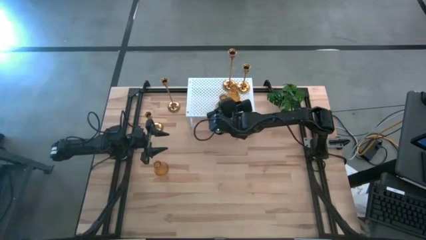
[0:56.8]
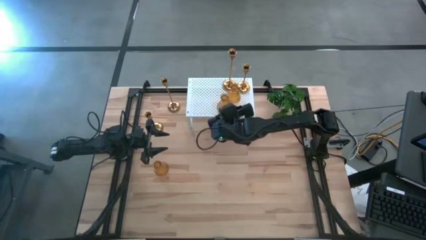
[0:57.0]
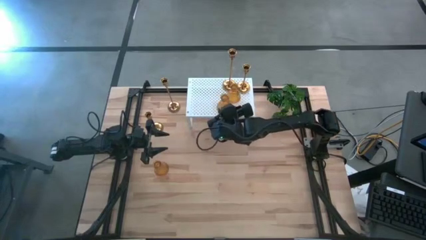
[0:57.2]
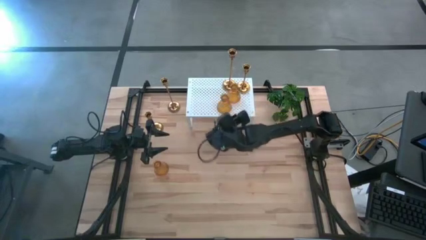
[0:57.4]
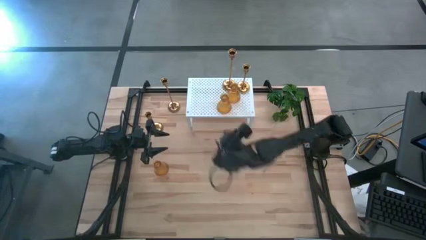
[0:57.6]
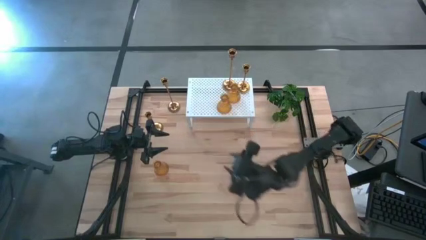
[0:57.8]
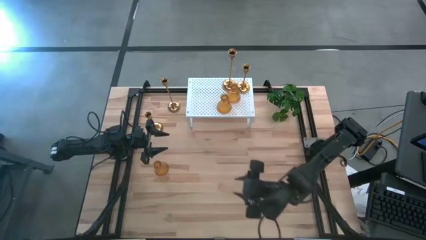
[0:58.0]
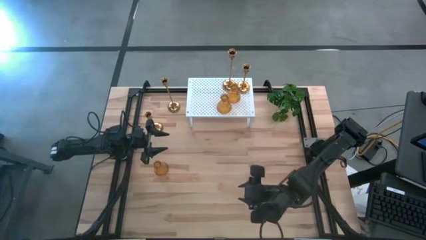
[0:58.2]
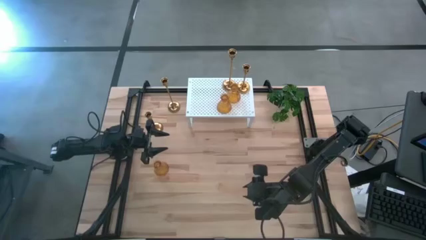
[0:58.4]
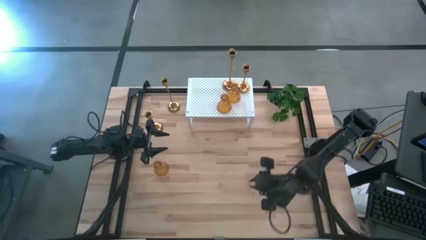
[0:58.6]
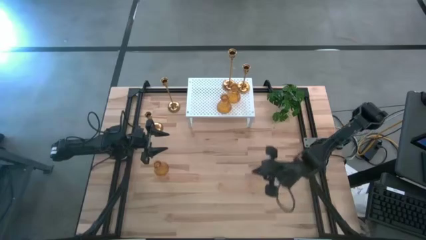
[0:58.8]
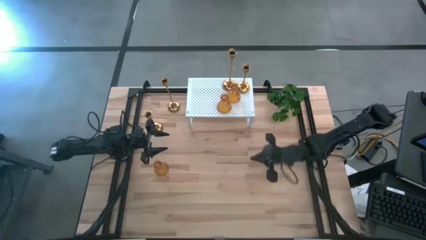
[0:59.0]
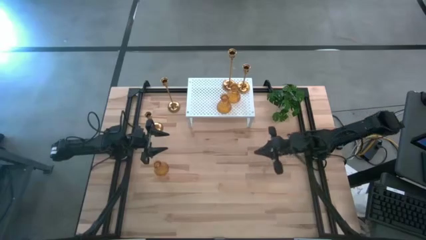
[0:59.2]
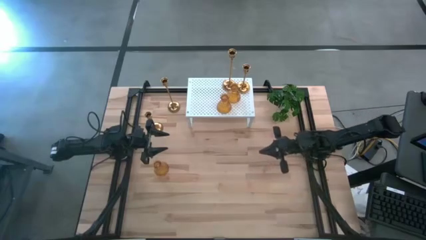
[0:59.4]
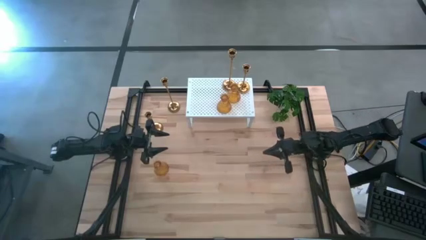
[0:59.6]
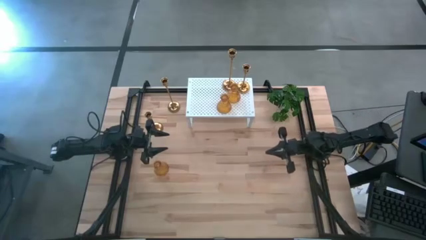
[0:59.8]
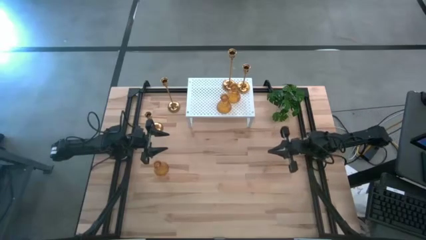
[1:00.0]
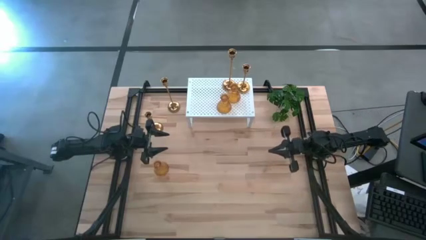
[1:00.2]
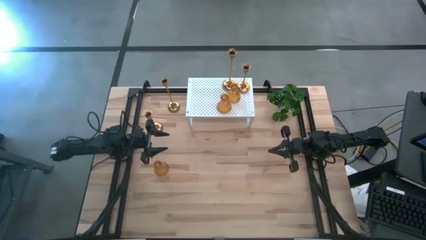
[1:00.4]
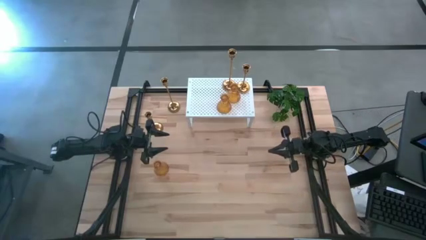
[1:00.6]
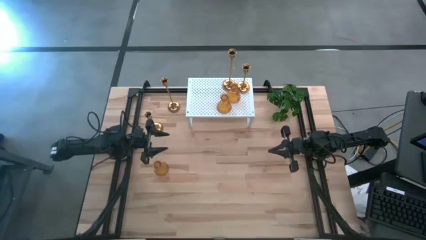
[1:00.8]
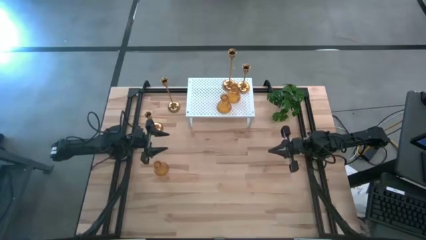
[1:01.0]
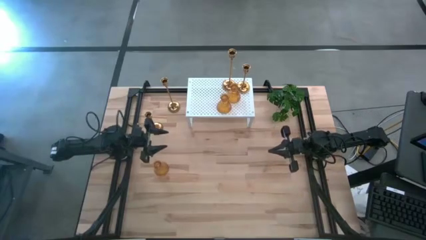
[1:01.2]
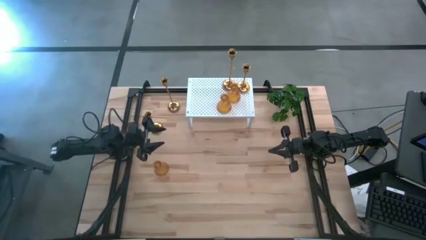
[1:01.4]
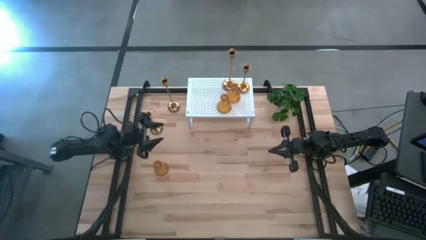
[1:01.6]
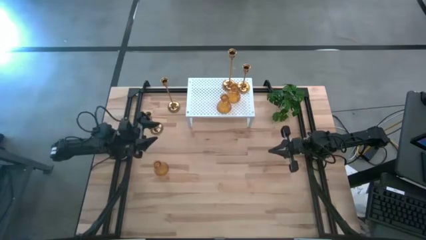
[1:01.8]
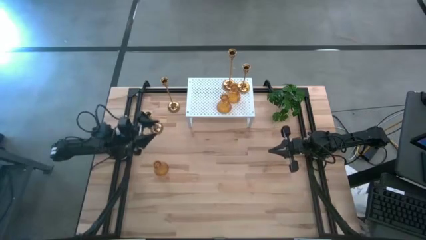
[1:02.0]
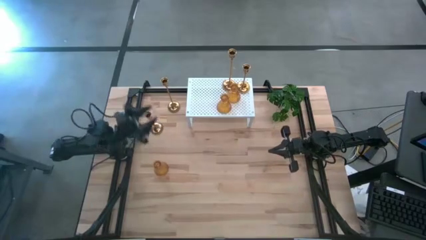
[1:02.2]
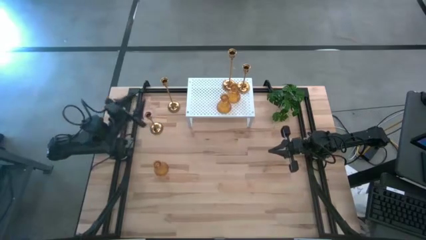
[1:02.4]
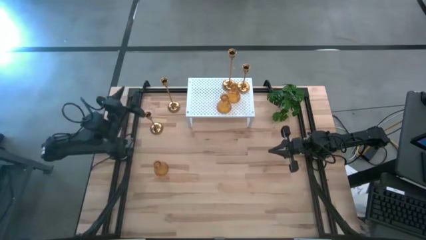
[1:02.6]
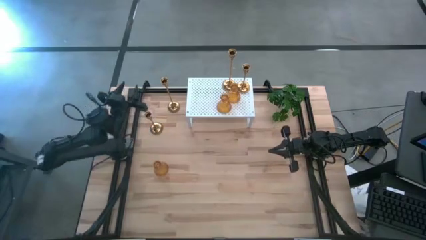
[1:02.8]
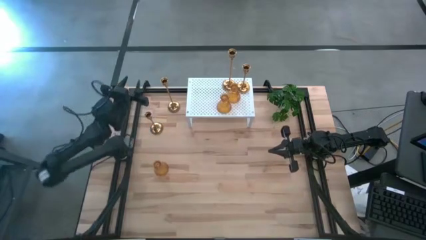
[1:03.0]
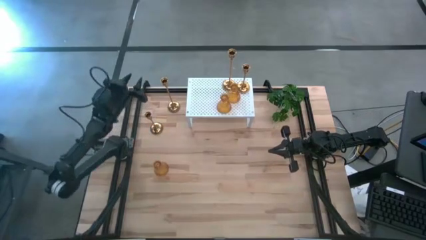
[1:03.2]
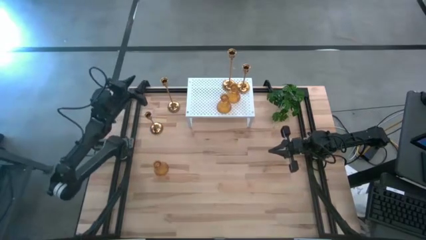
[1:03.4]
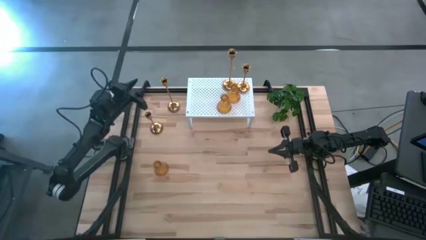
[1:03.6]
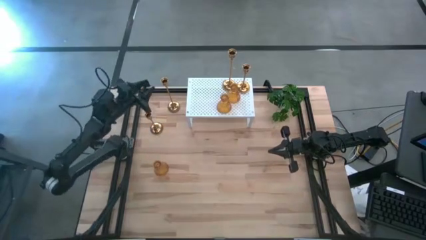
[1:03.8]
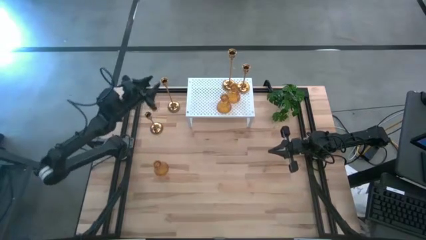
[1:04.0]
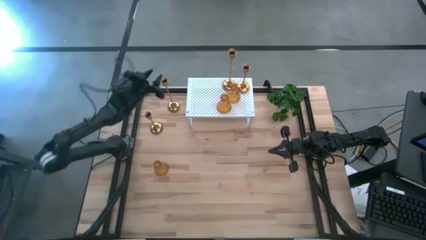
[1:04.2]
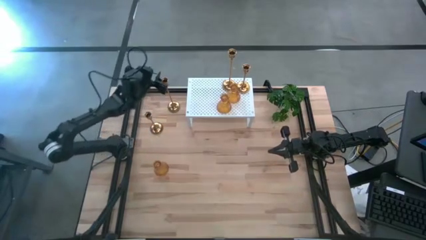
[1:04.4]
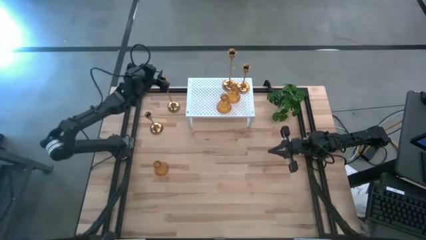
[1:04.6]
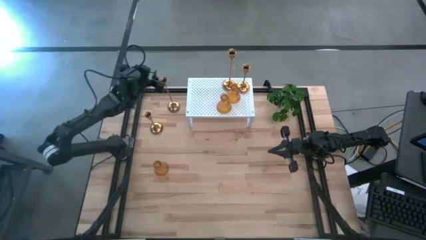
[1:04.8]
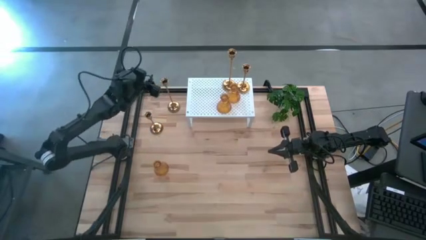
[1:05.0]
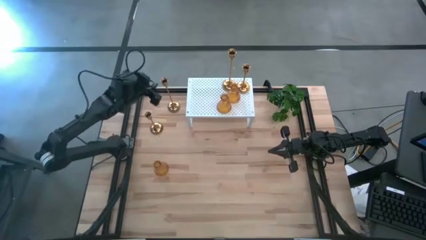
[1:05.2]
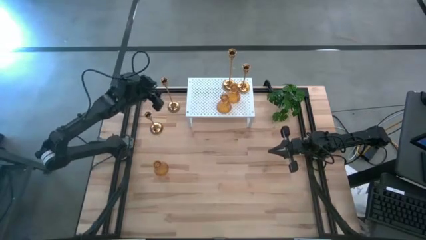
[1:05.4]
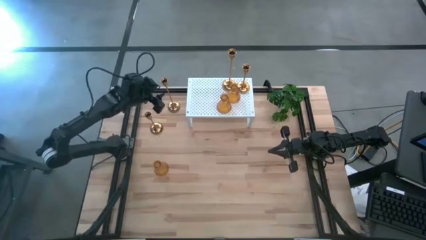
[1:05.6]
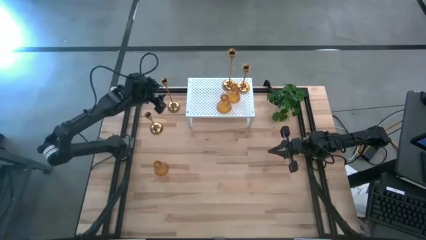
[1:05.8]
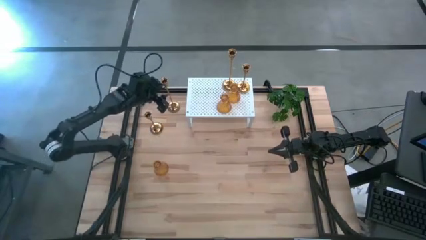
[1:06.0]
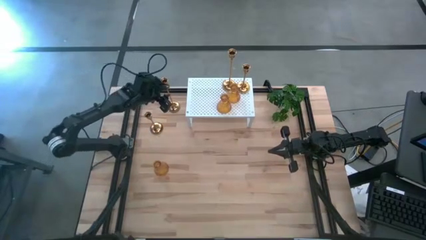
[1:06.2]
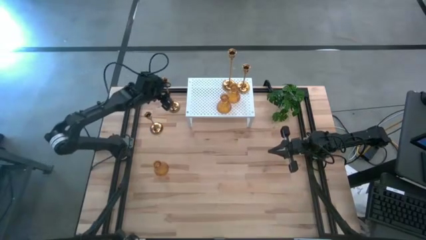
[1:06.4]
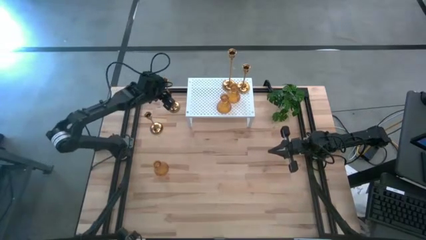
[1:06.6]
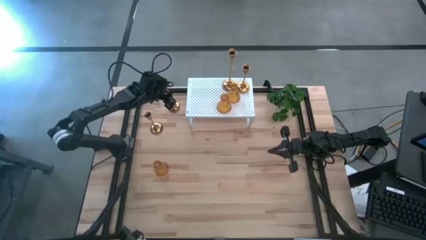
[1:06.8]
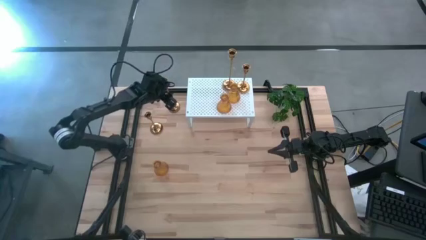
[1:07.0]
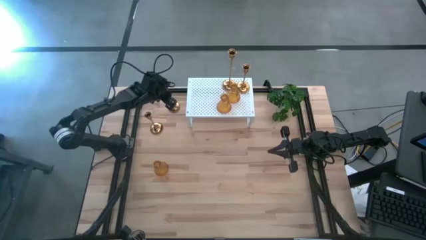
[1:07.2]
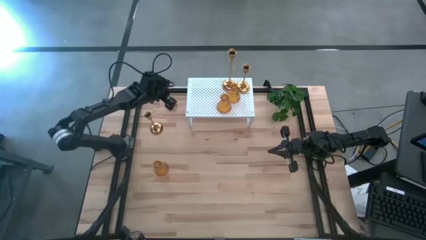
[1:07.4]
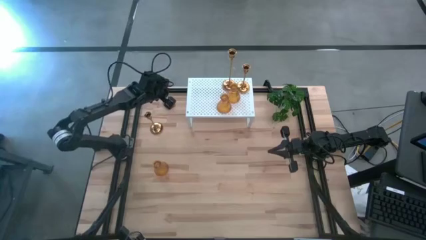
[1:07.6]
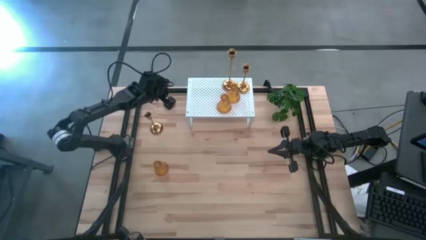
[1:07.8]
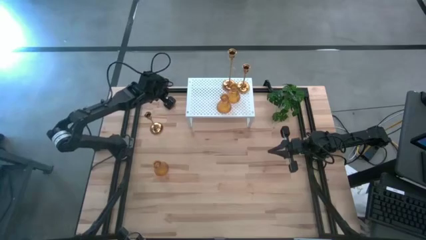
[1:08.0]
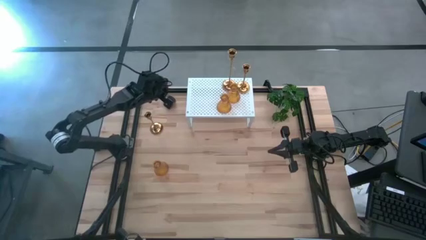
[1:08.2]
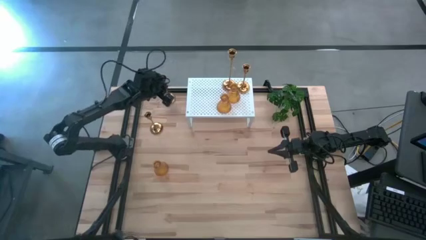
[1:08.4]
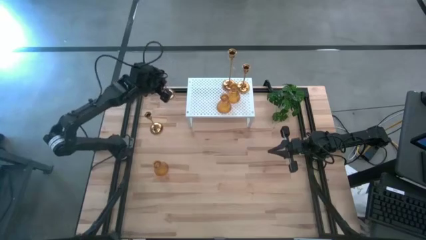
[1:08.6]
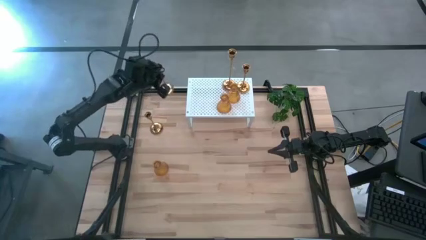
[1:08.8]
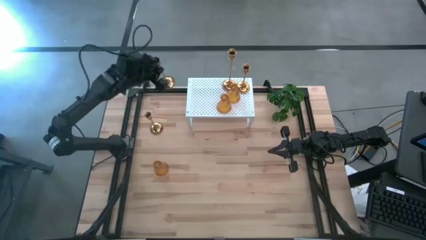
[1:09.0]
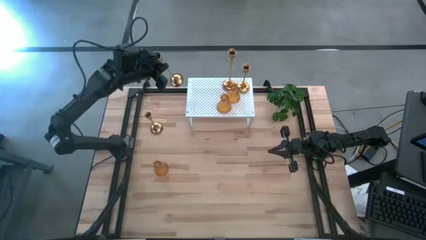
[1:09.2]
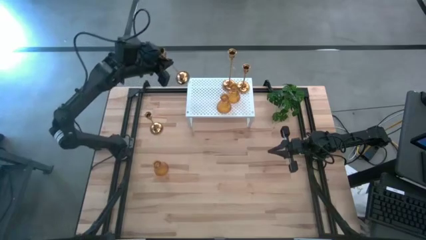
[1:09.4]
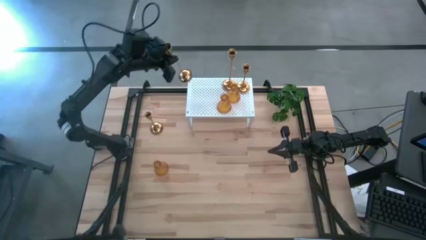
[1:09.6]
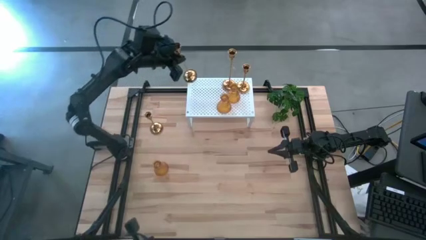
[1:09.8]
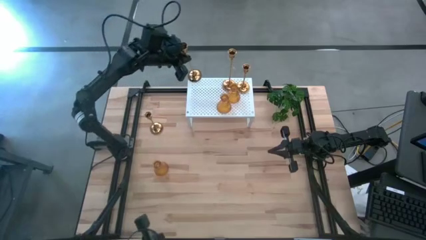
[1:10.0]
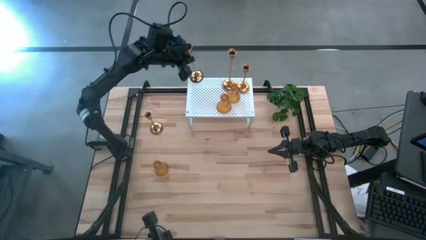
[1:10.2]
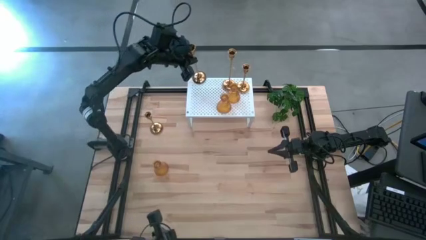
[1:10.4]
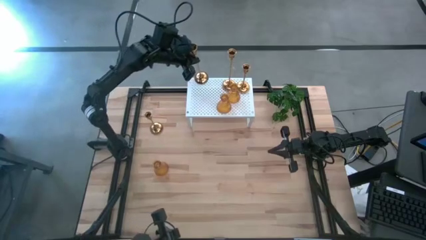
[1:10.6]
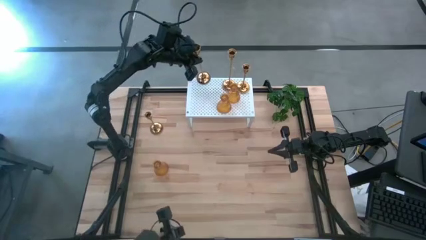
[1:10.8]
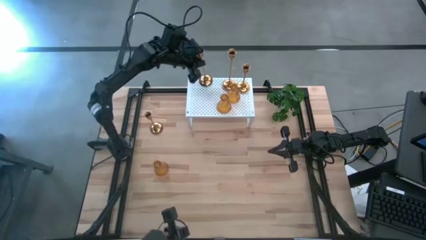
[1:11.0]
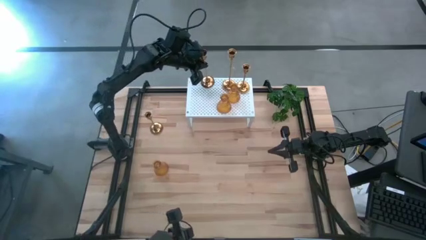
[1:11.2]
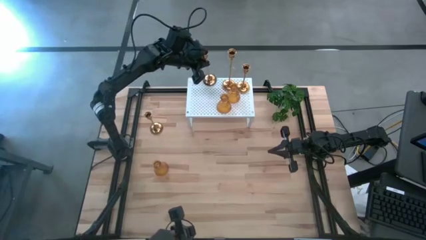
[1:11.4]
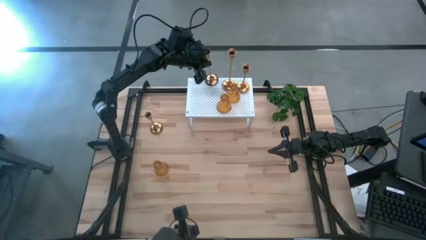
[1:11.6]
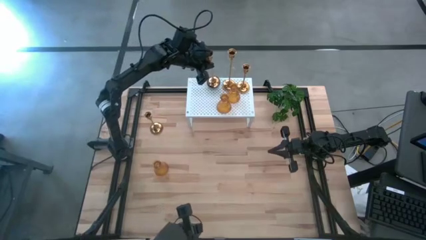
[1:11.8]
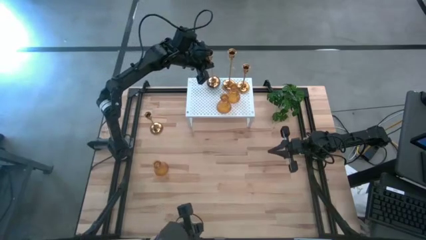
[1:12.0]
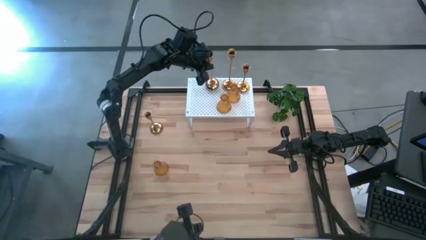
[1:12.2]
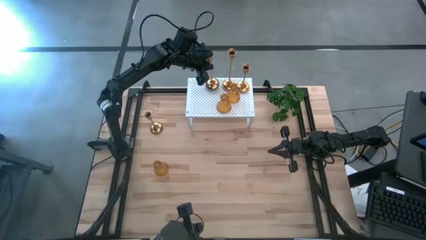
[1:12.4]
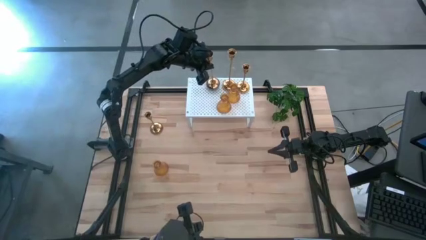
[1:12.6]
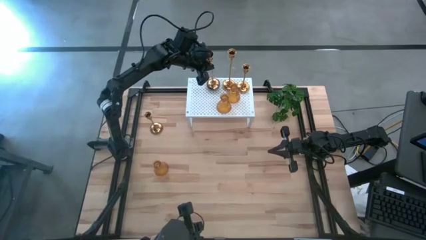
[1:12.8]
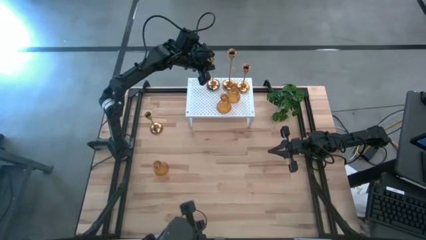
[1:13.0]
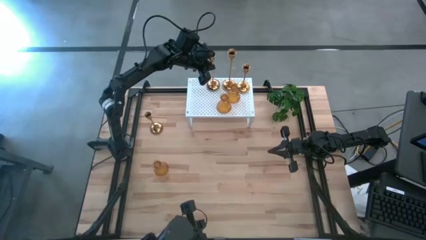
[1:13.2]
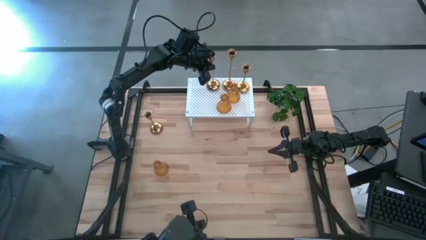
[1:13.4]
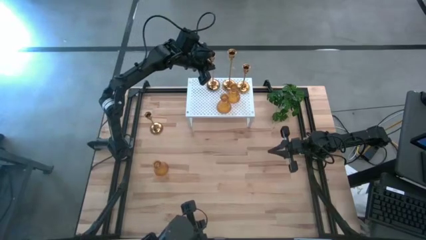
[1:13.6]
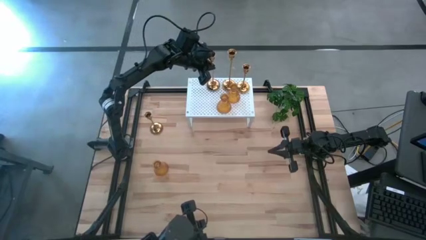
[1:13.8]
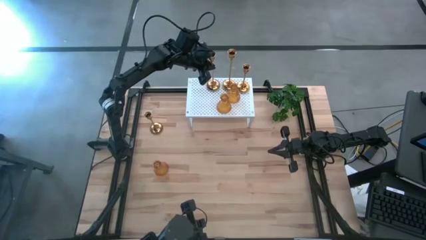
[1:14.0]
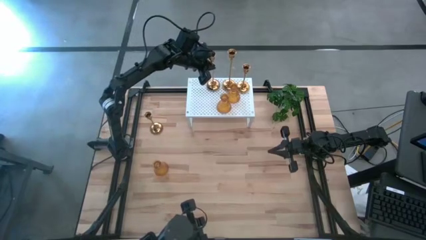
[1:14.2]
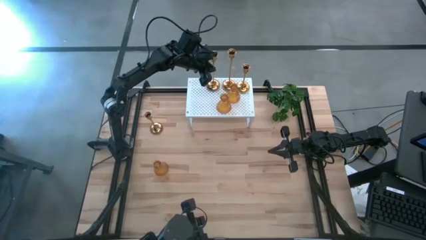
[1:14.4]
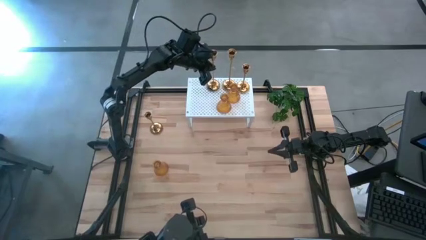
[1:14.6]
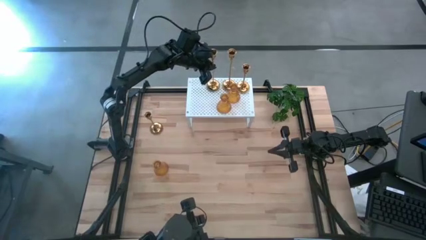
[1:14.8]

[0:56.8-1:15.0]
Task: Pick & Place candle stick holders
Put the large golden candle holder on the shelf
